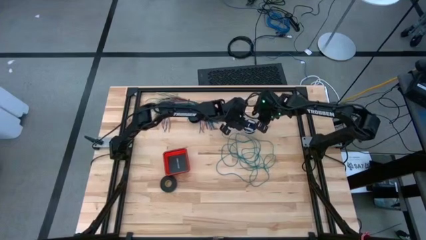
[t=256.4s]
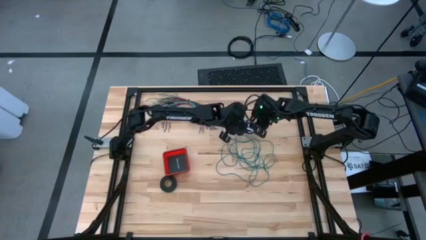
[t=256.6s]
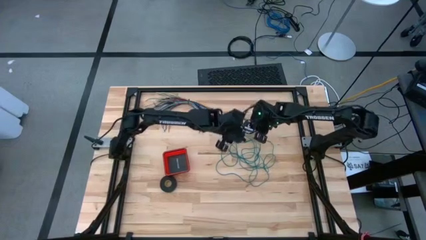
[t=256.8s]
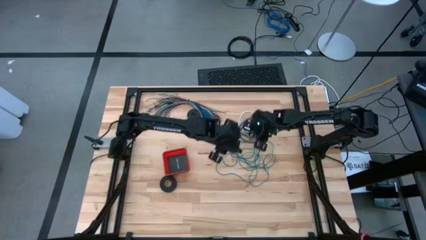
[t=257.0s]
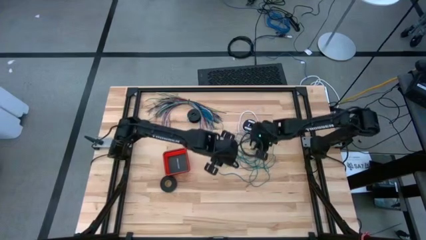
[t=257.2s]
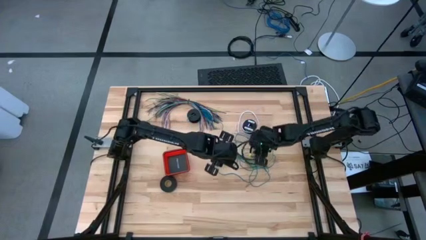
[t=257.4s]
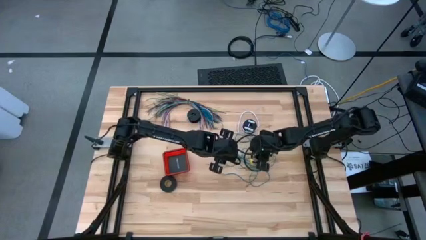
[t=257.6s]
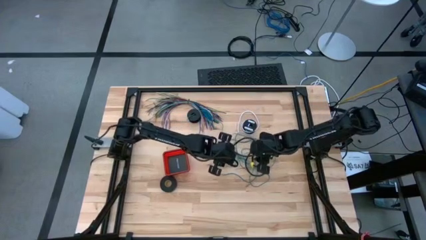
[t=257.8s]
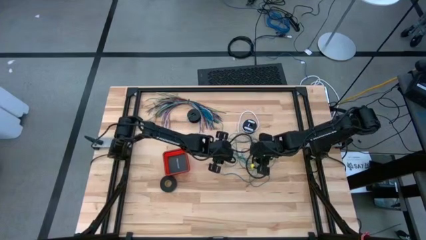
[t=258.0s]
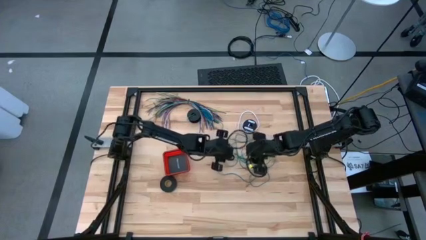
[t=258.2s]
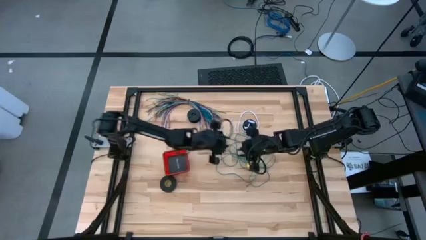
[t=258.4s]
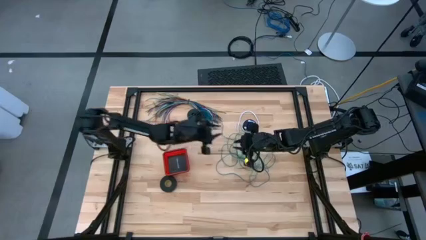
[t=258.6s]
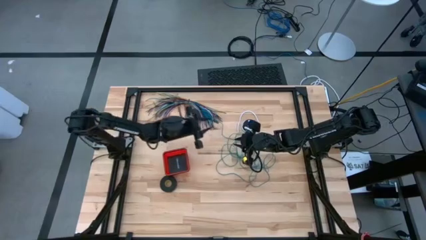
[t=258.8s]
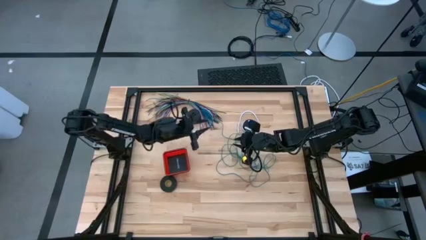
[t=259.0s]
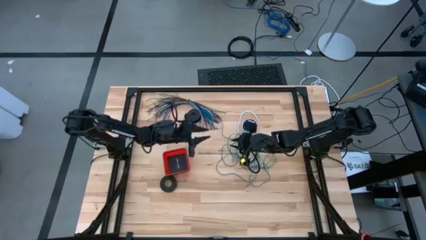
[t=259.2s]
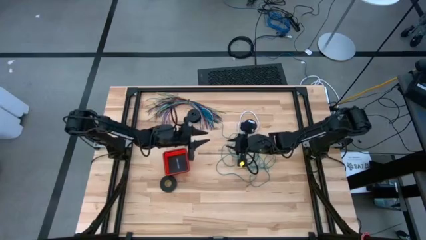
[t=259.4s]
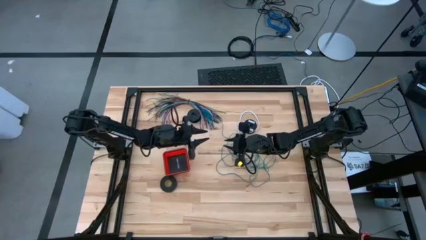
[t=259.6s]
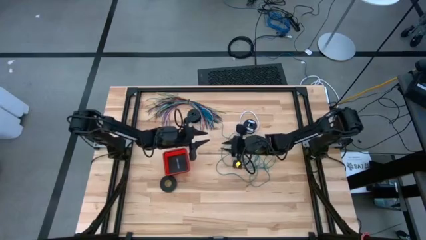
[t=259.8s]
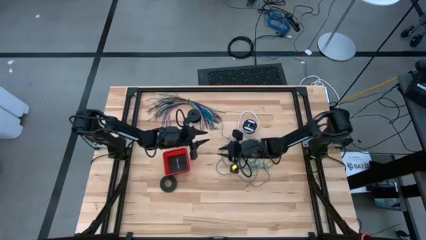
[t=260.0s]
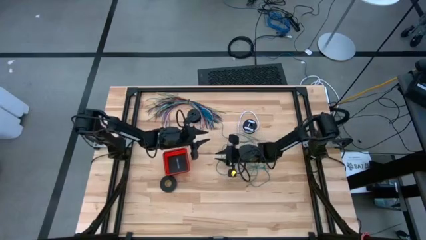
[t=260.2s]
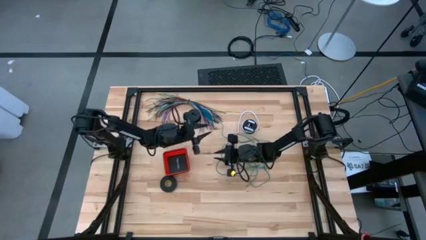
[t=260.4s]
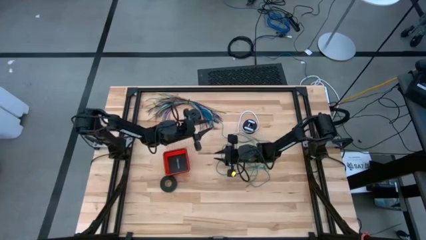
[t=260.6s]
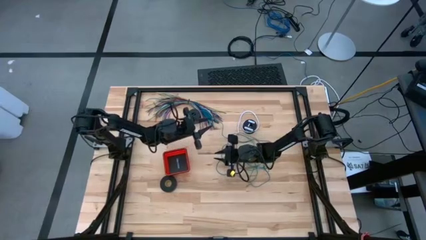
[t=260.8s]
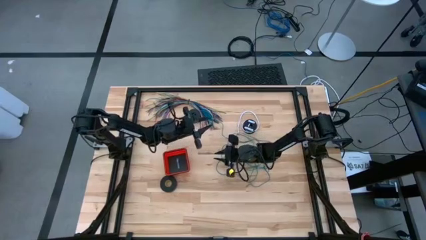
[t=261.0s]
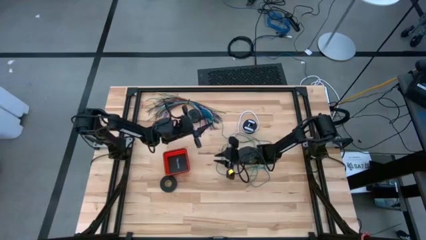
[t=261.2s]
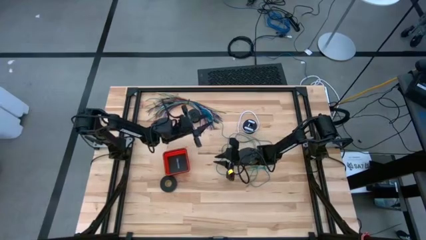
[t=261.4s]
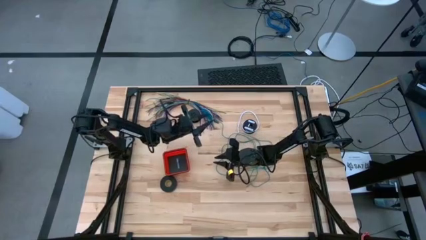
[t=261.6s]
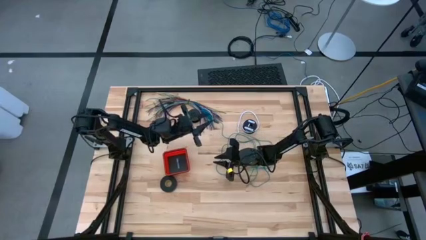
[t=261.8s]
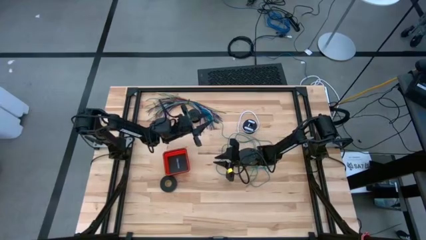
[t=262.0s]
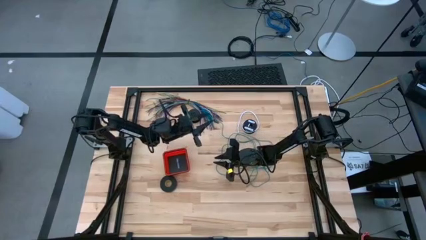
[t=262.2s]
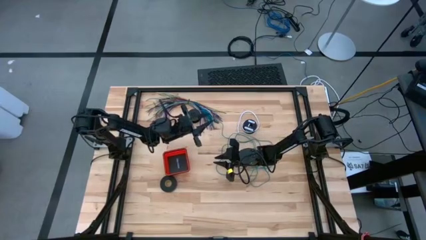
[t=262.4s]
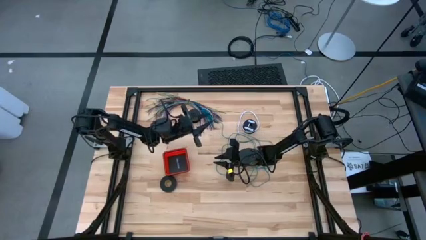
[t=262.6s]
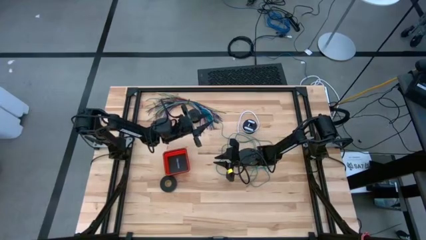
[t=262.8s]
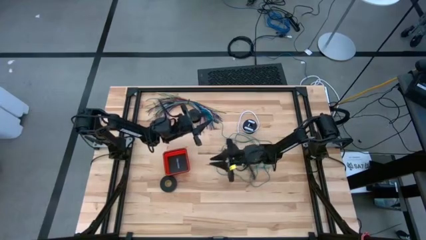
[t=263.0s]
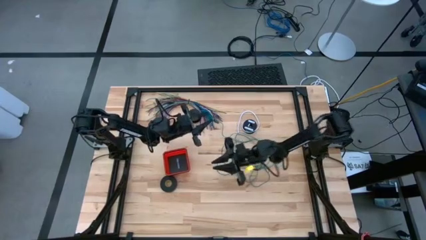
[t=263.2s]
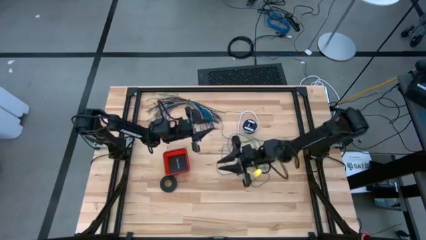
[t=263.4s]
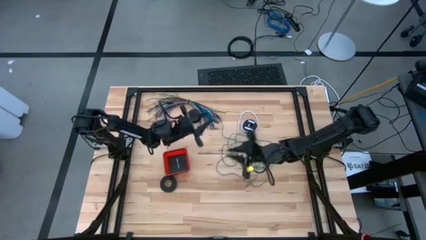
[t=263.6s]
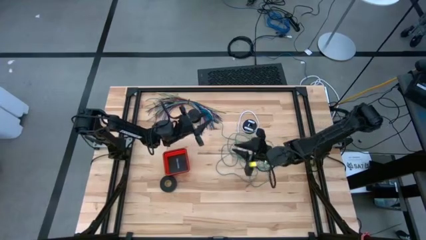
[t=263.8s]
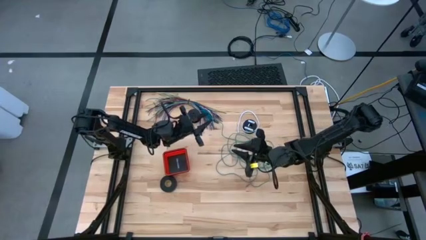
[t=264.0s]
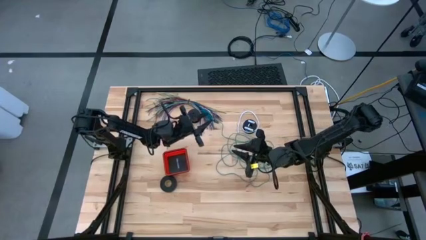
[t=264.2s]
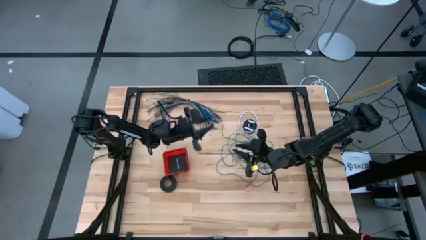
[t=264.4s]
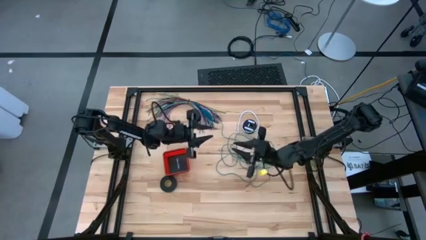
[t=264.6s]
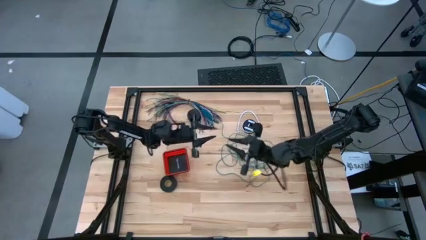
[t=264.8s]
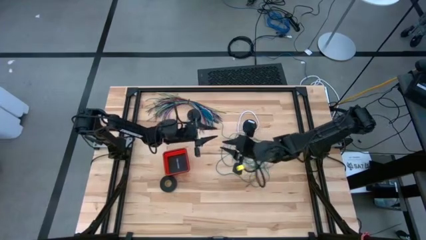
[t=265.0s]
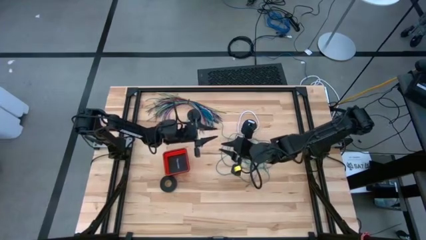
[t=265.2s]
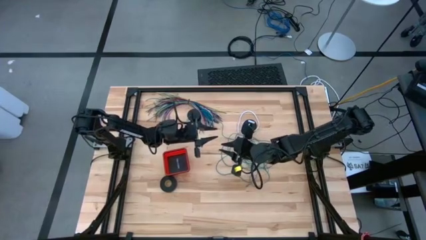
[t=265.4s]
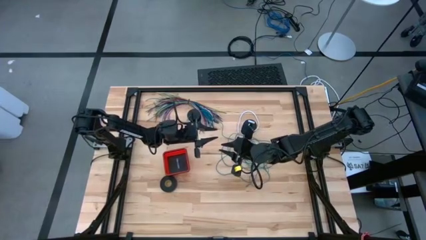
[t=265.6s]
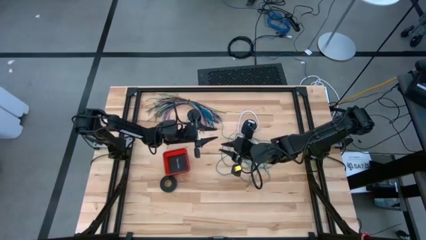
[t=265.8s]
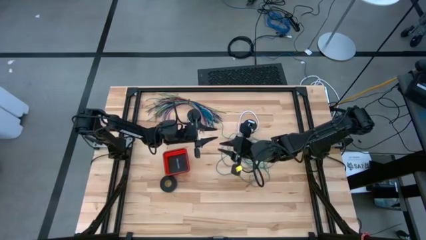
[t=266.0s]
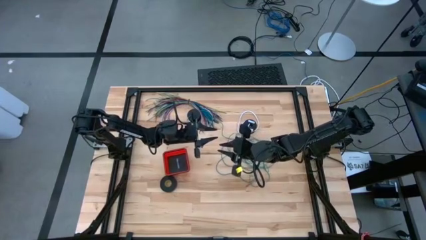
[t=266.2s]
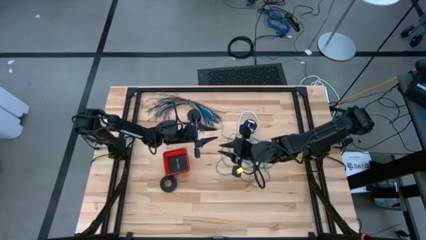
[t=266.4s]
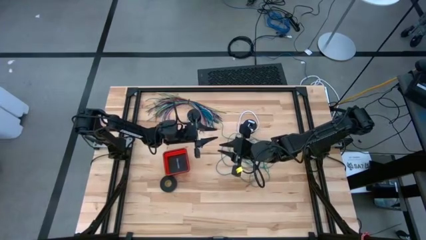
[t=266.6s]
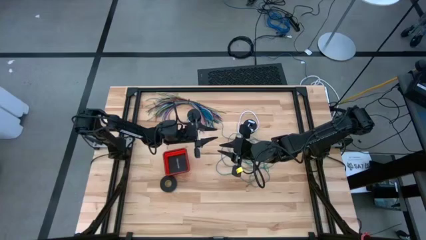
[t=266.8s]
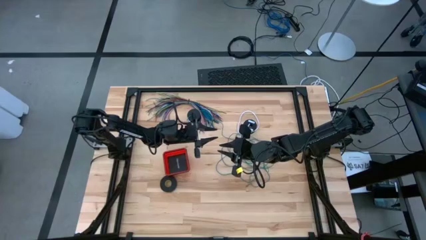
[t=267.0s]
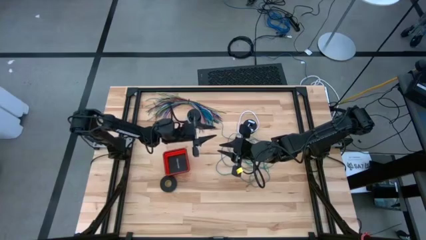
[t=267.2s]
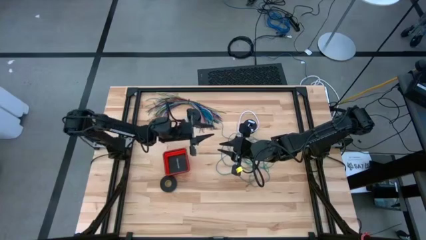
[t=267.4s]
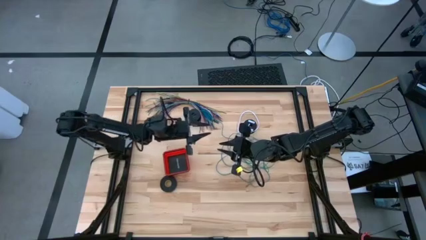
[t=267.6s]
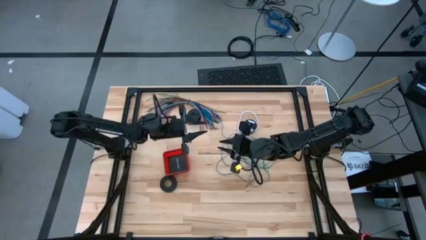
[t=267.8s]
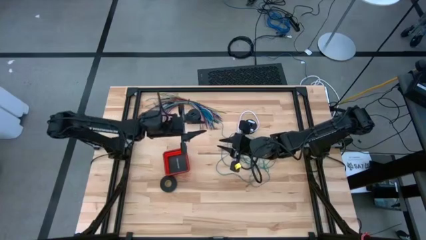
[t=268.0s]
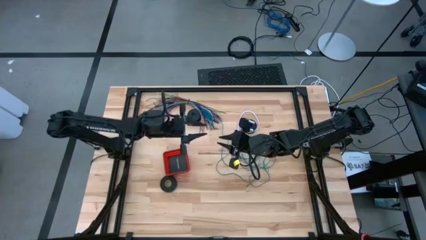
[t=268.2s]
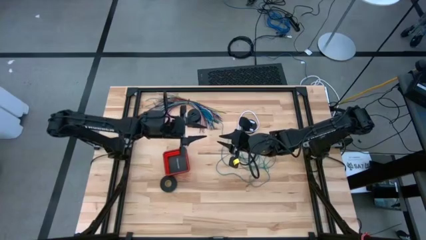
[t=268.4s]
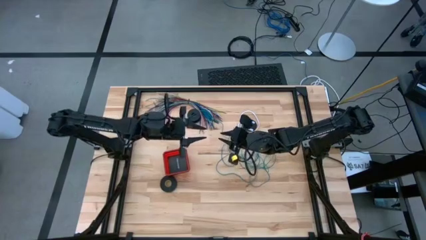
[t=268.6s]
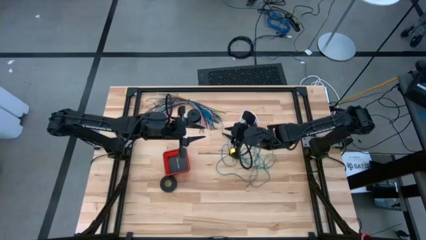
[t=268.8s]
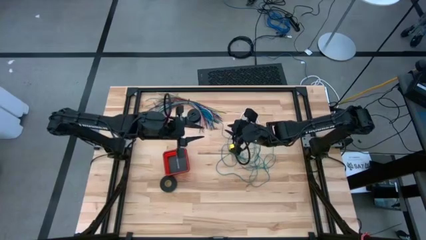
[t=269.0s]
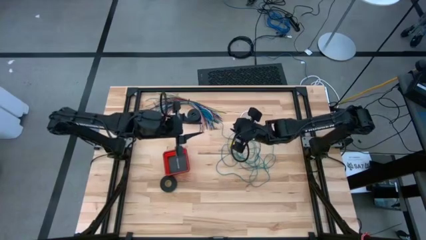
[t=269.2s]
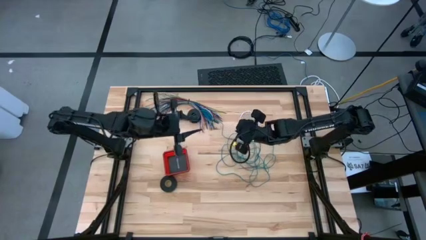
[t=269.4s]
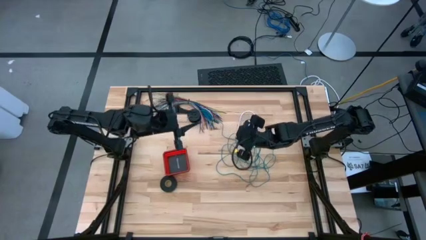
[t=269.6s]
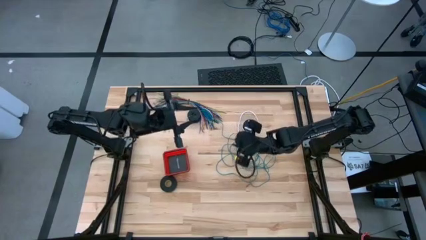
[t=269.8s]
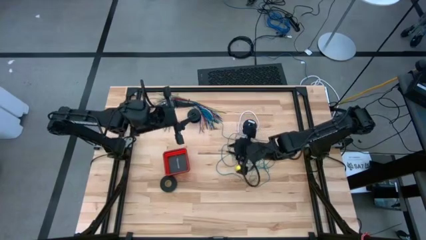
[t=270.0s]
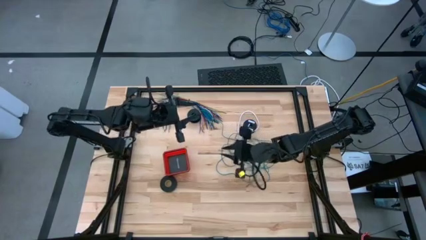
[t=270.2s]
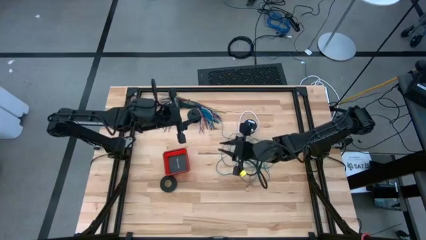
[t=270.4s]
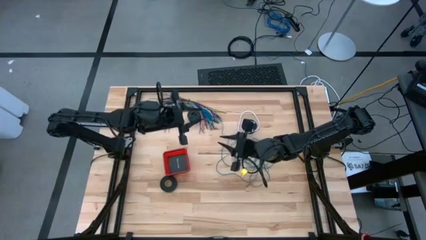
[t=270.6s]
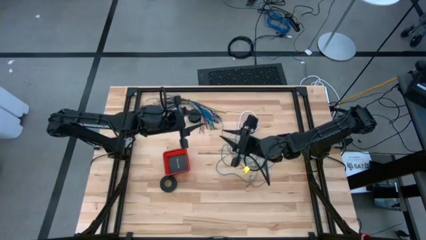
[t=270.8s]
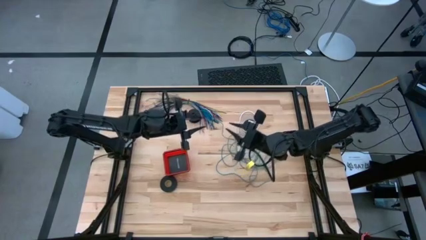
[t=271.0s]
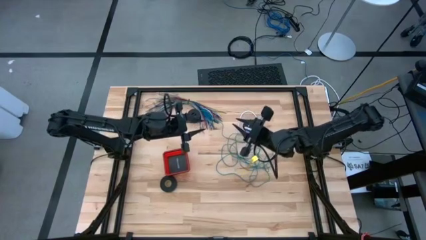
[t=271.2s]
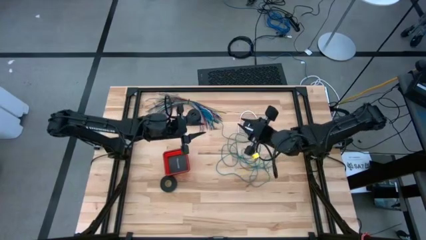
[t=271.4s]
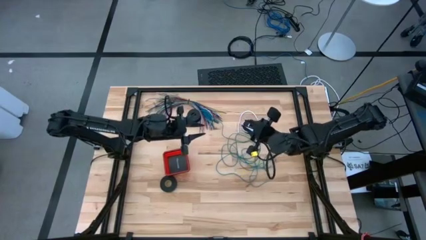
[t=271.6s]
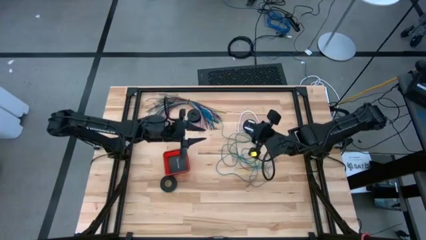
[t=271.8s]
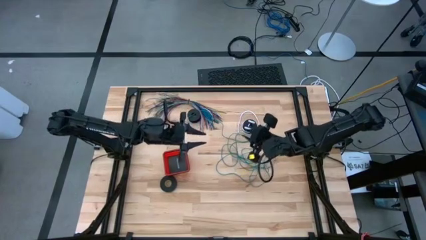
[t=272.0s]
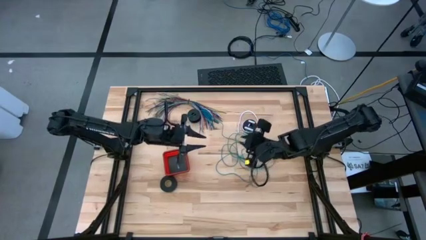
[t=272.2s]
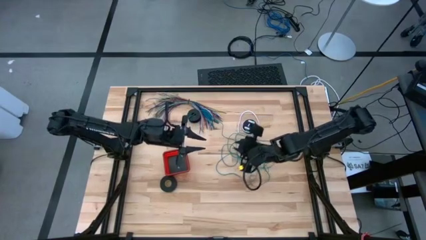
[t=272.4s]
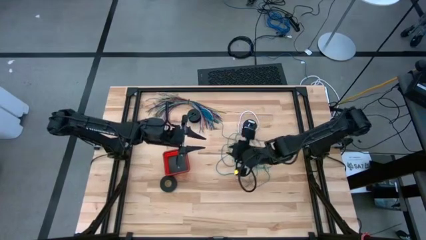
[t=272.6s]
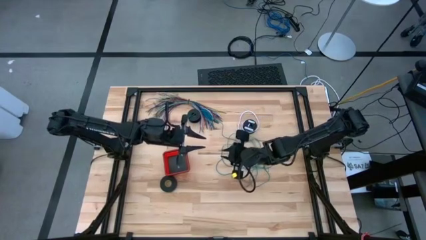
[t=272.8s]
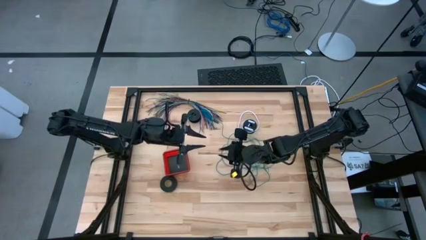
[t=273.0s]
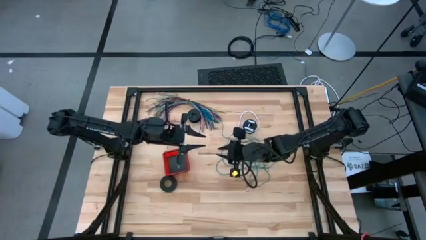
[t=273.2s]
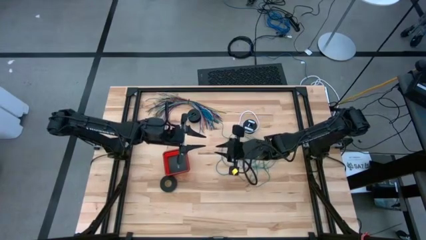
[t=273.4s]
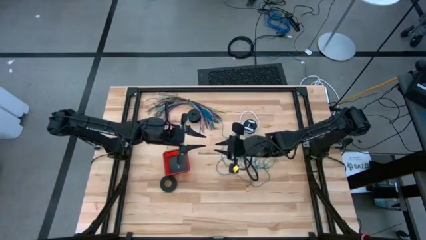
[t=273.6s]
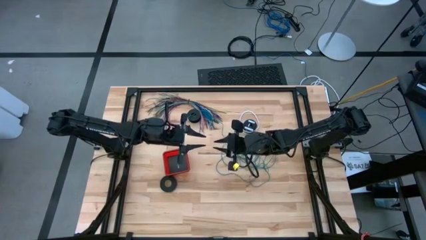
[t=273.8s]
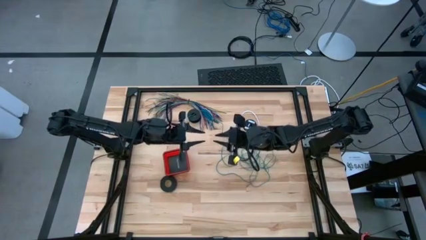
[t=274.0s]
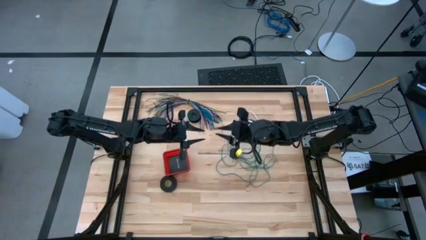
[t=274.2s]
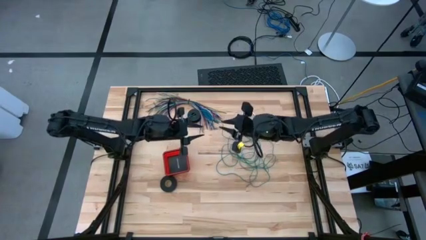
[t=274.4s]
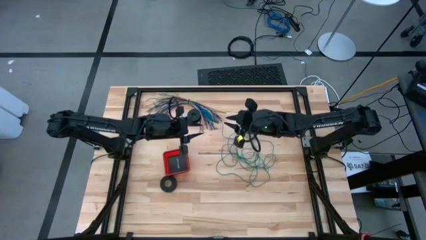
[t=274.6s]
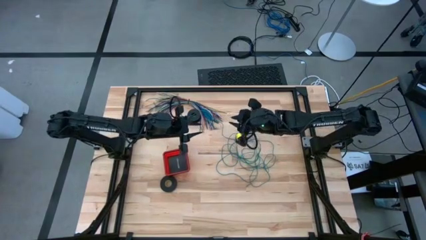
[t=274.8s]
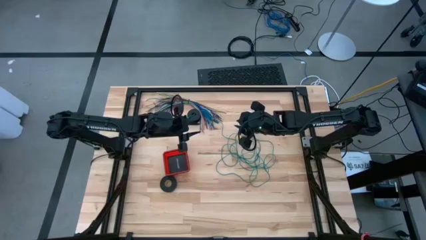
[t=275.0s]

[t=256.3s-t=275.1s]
Task: Coil cords
Coil the green wire onto the spool
